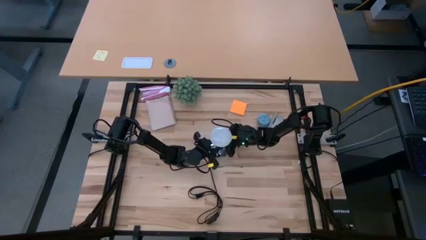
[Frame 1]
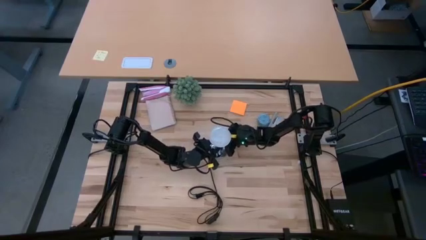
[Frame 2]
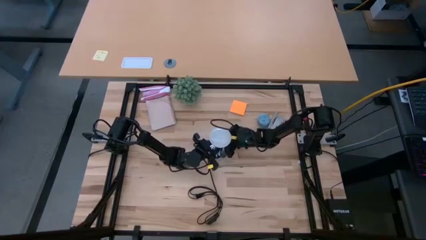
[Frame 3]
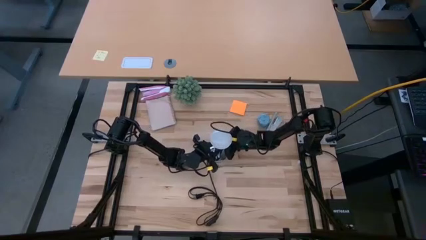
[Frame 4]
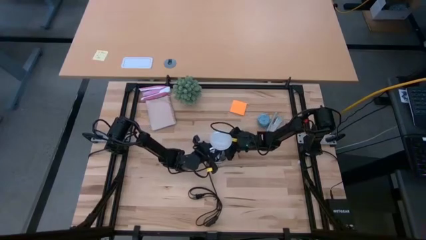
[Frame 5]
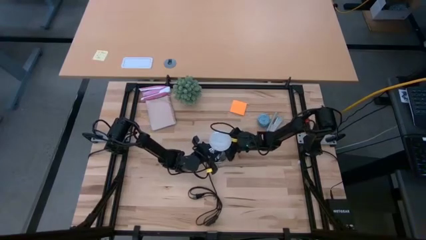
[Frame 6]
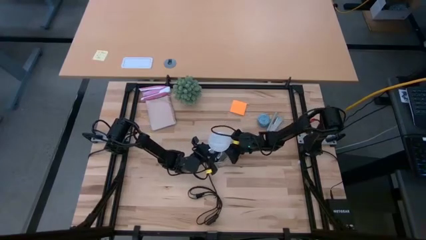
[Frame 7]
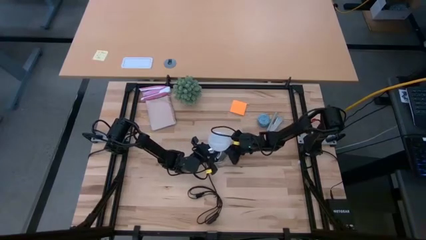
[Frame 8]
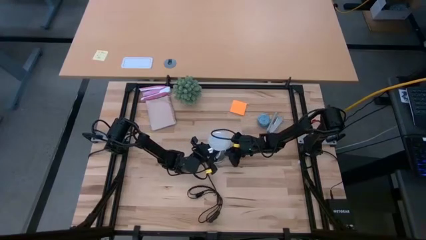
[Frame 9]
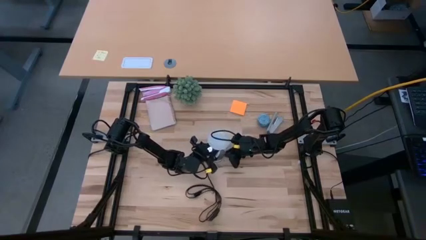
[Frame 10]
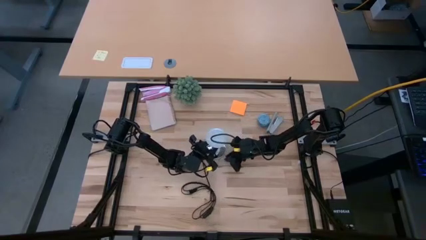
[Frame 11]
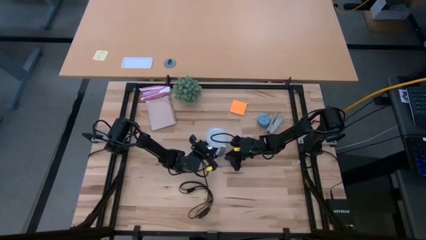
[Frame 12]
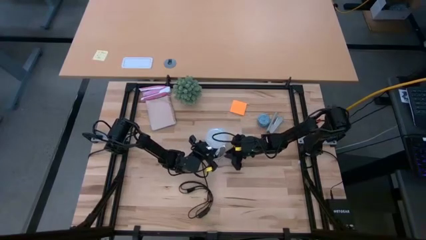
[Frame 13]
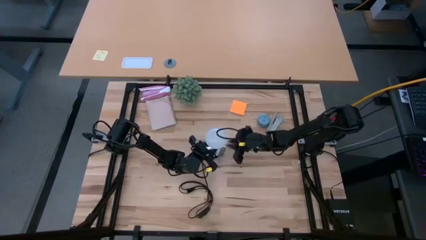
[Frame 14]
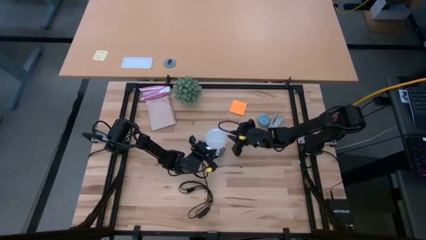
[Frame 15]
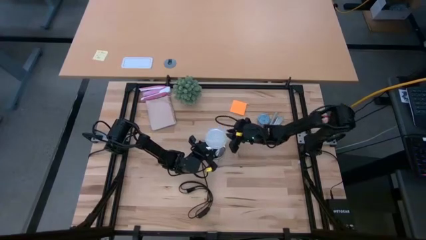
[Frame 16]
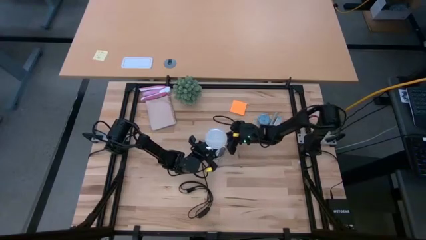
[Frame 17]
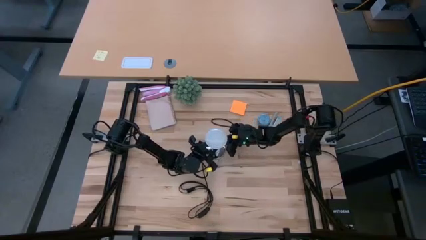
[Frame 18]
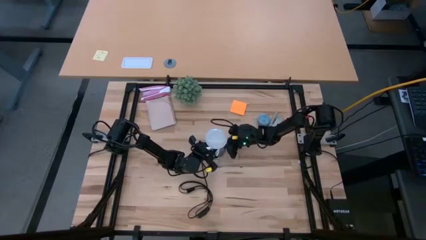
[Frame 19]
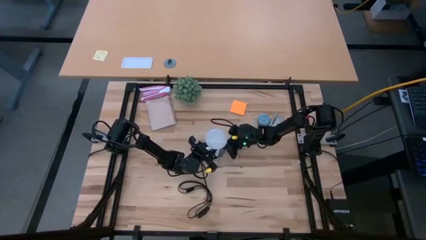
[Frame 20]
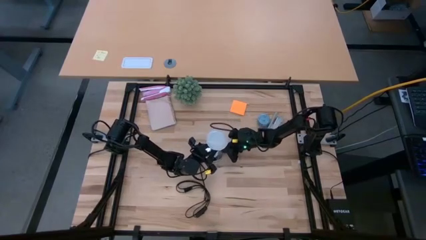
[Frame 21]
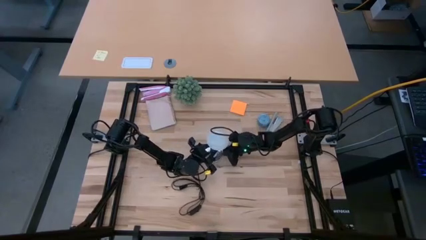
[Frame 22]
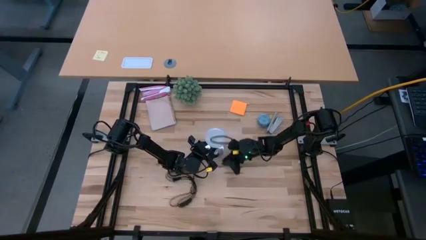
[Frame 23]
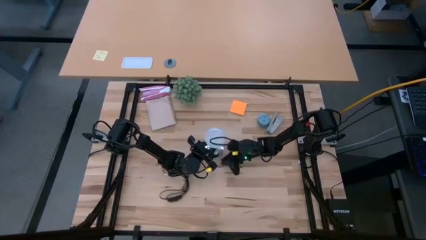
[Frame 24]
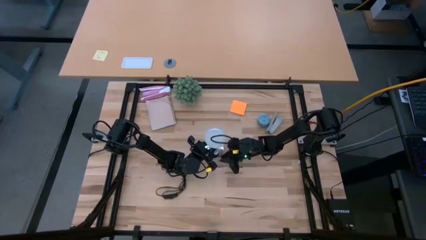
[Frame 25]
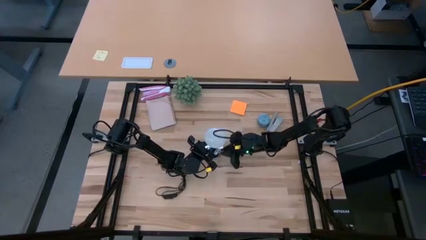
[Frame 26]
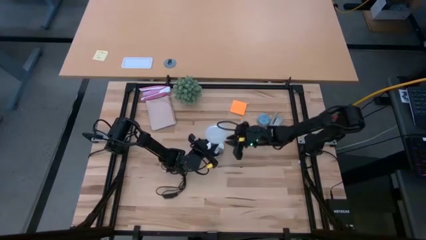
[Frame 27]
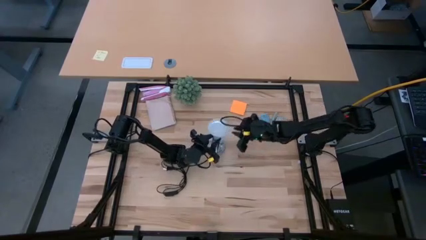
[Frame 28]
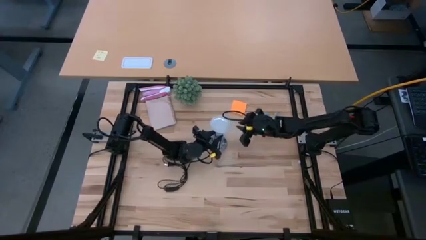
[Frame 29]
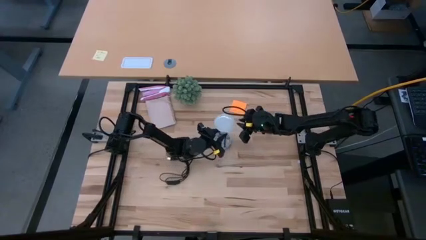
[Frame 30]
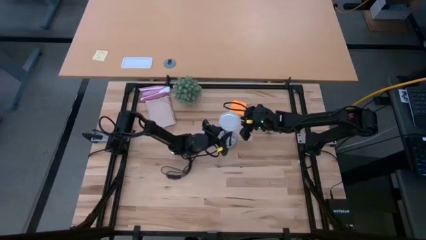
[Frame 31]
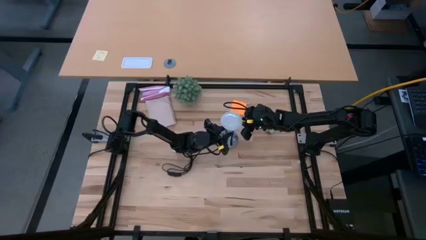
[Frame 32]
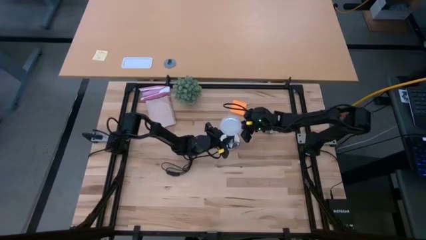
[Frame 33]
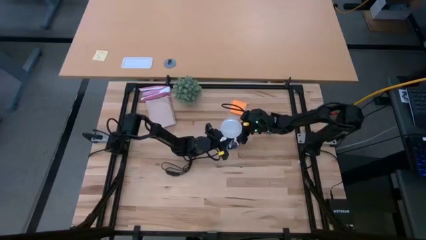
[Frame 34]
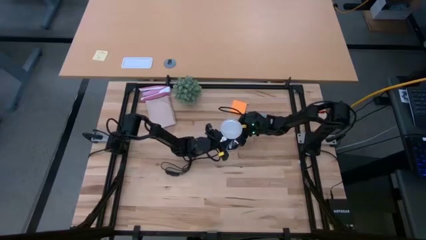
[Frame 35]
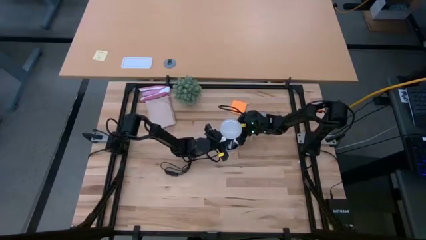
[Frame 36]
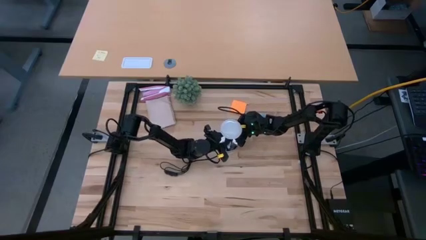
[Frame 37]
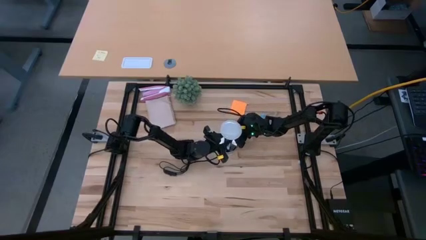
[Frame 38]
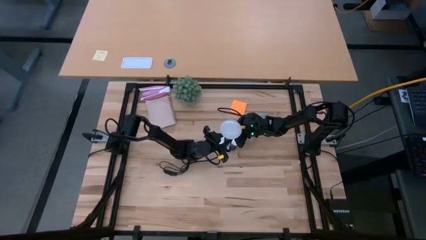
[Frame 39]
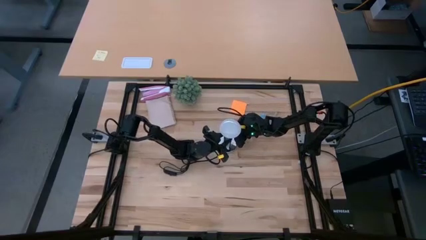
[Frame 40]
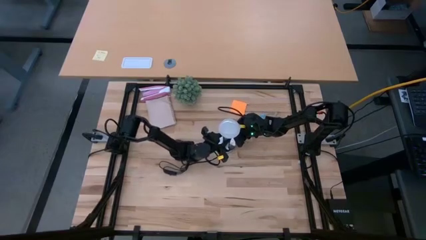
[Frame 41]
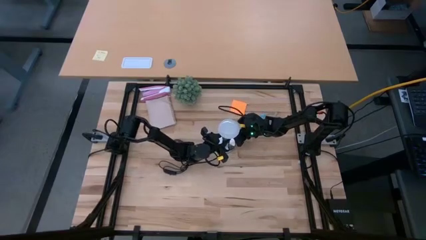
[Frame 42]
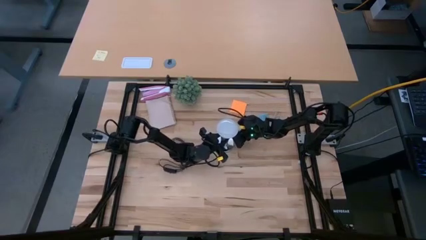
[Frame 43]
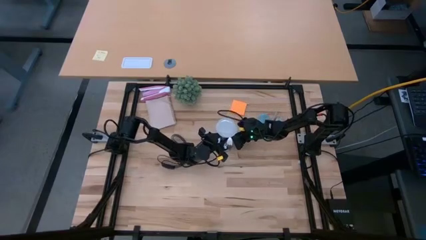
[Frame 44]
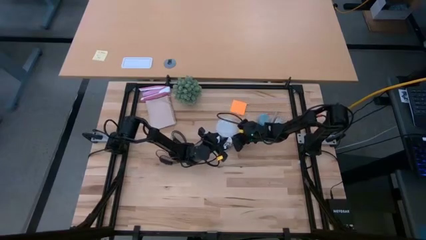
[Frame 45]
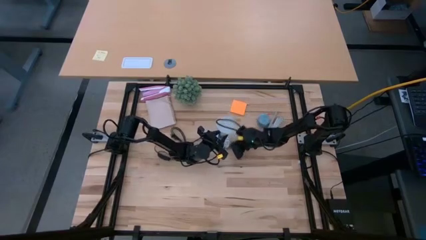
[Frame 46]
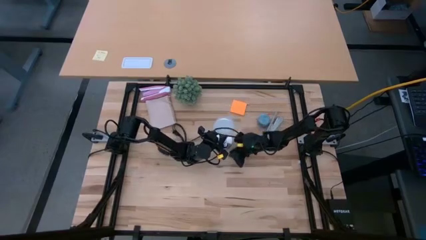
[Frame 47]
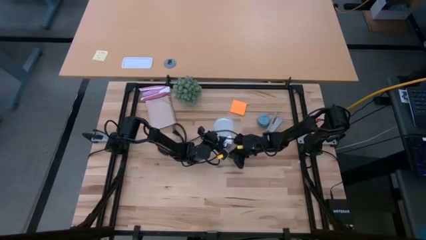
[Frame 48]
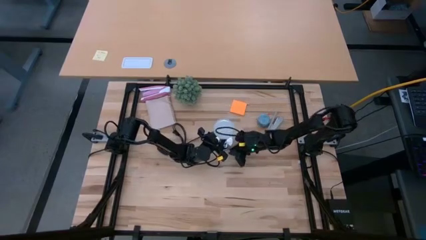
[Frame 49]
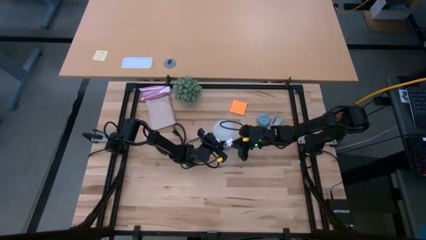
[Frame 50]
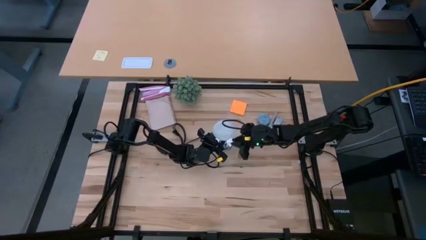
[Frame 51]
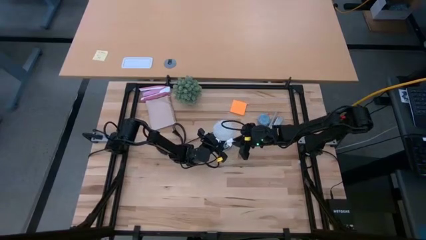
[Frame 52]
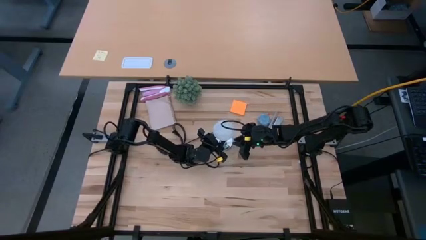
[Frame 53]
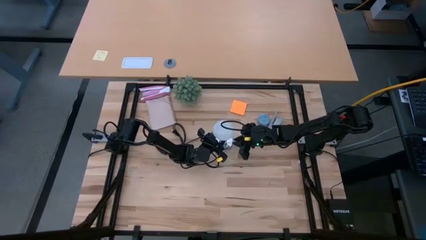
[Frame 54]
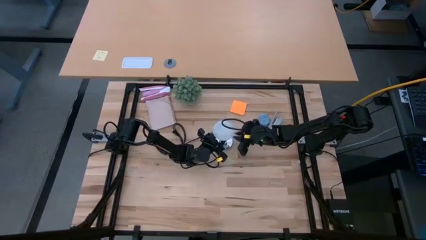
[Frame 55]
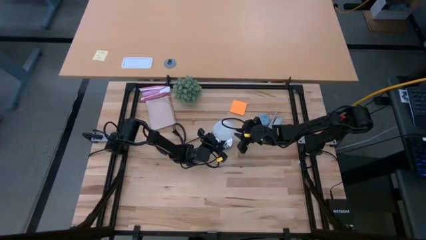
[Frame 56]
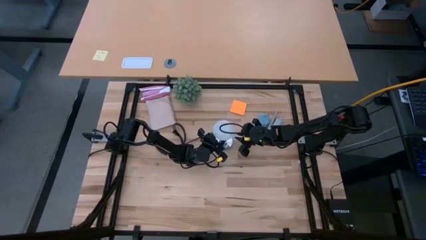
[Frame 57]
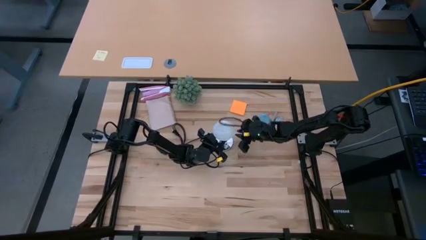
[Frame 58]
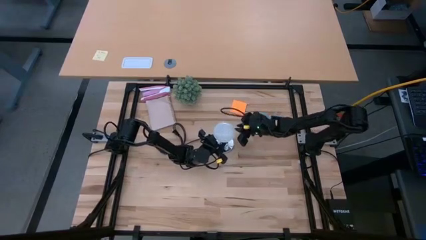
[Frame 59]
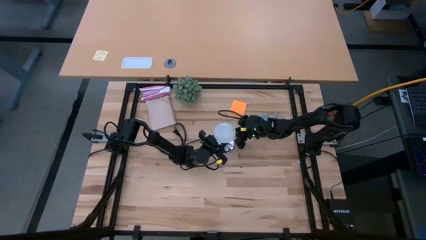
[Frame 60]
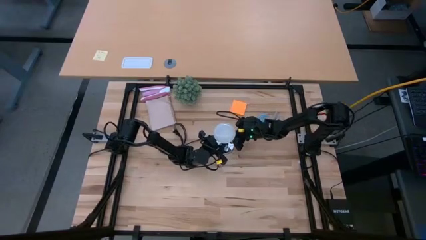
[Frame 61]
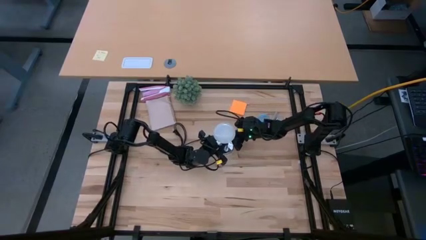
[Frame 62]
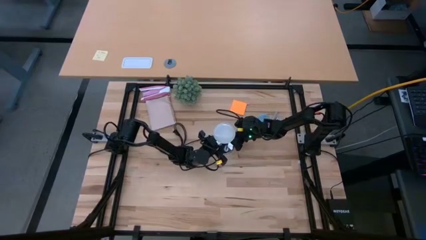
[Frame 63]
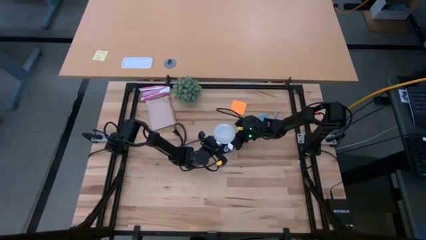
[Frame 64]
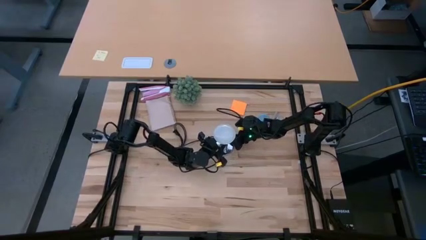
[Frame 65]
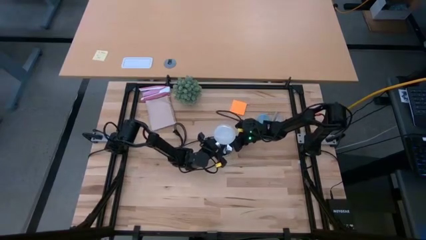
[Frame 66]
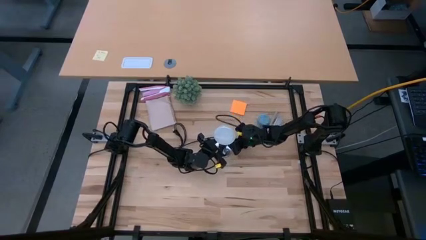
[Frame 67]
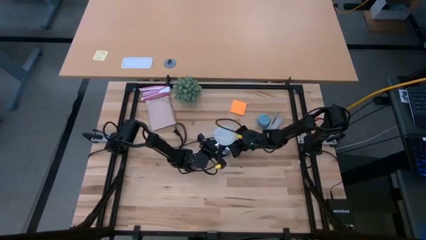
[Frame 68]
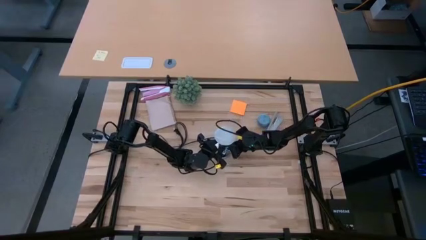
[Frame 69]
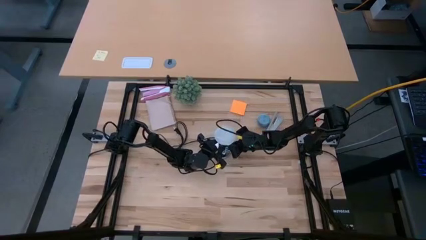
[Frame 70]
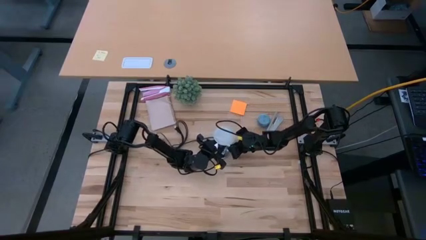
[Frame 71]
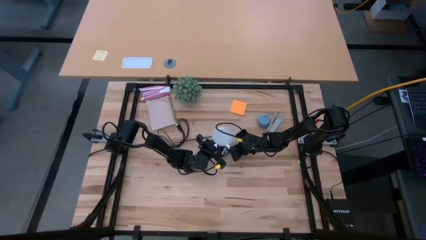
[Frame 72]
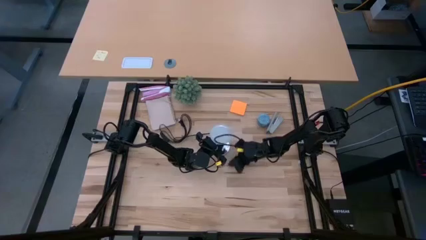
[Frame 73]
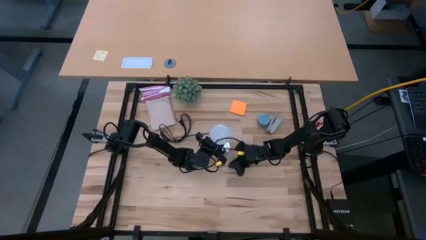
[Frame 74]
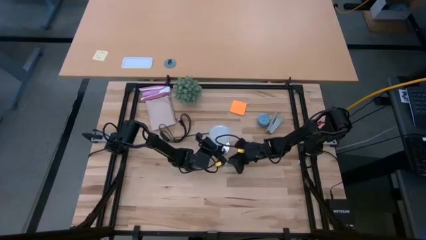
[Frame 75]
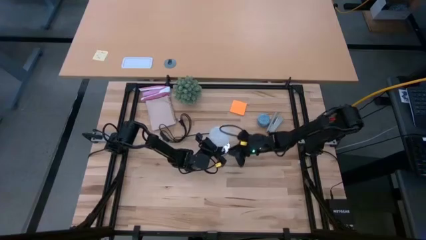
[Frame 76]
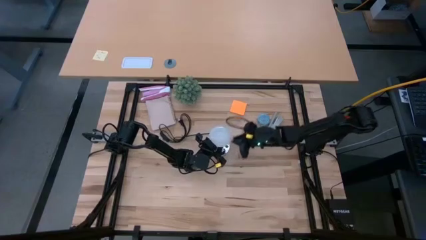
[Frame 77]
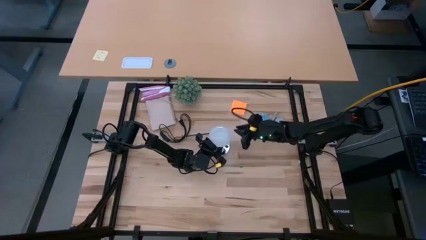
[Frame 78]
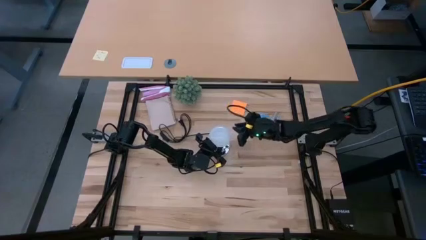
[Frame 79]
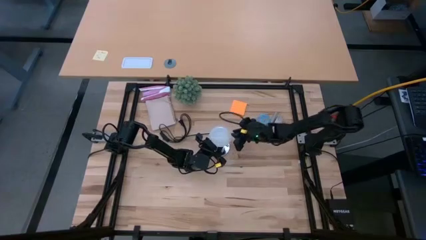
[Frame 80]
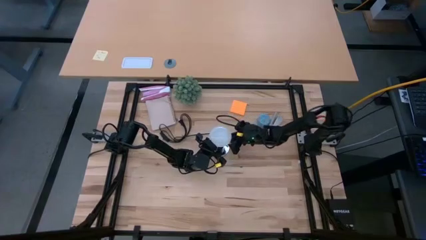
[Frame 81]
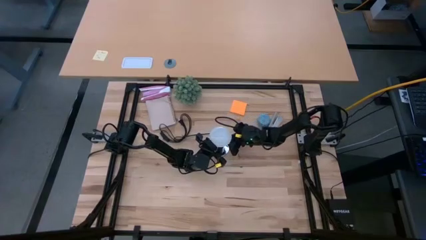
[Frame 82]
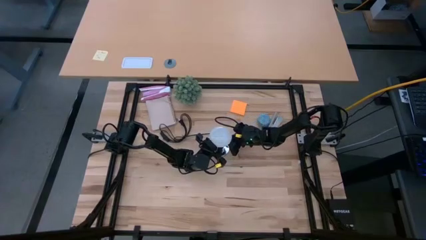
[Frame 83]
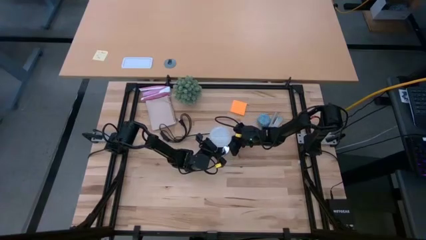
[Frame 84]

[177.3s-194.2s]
Task: Screw lightbulb
Remove the white lightbulb from the silver lamp
